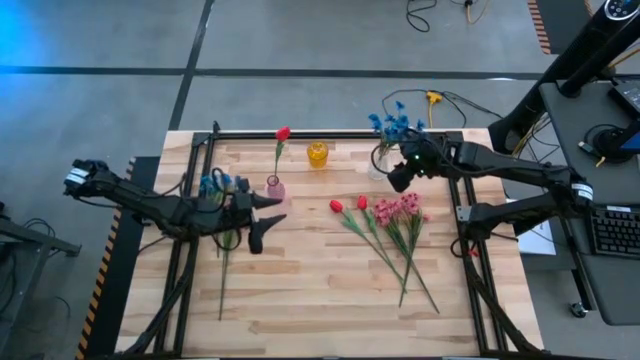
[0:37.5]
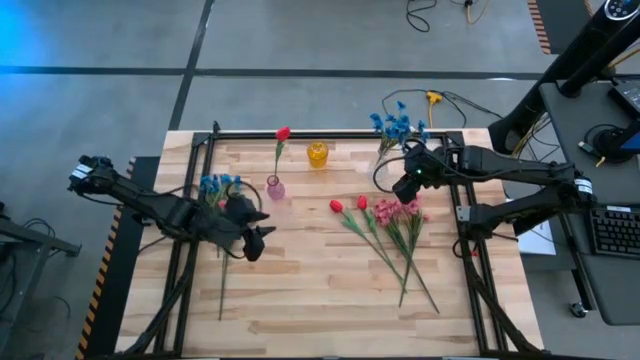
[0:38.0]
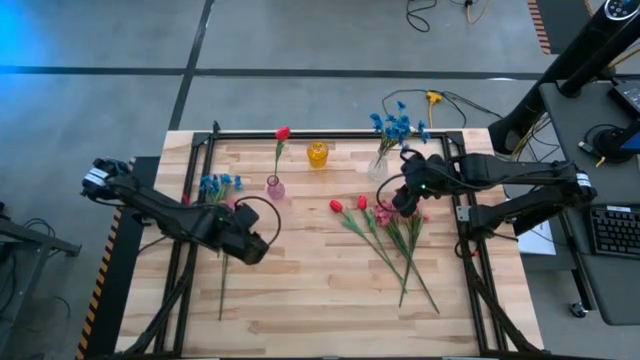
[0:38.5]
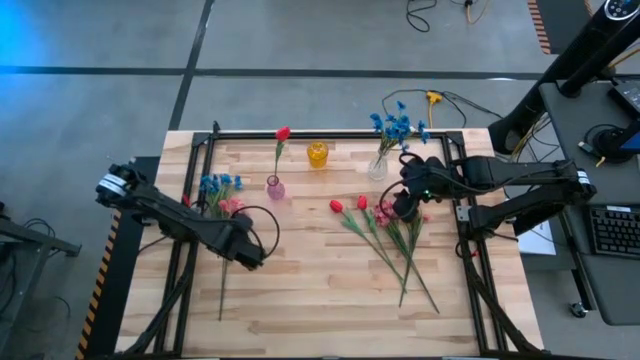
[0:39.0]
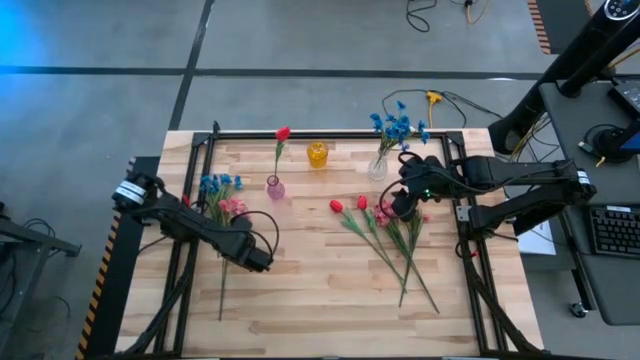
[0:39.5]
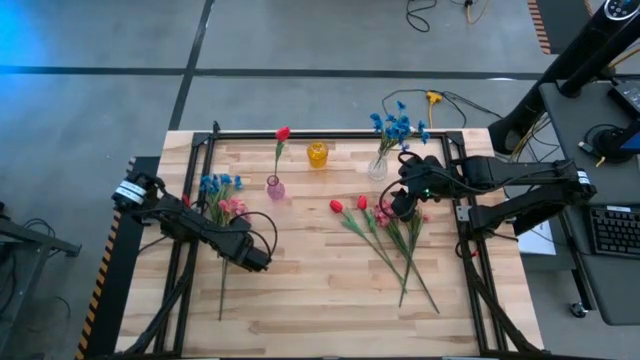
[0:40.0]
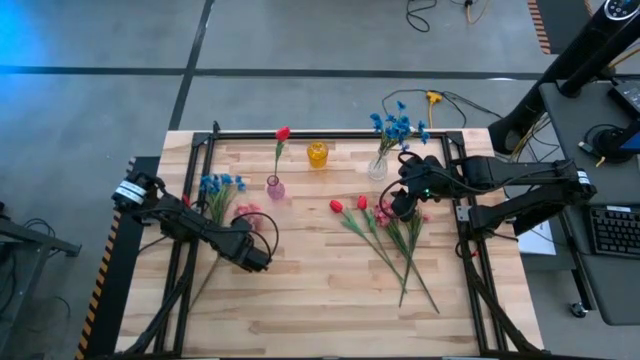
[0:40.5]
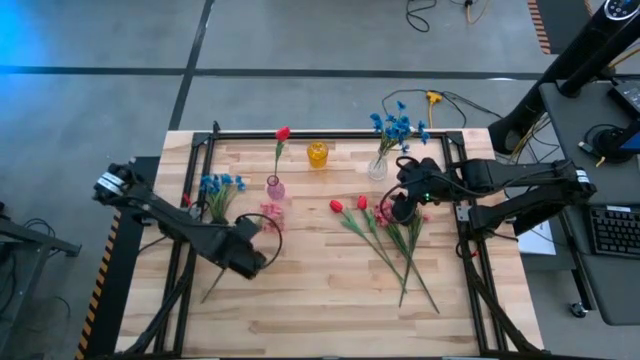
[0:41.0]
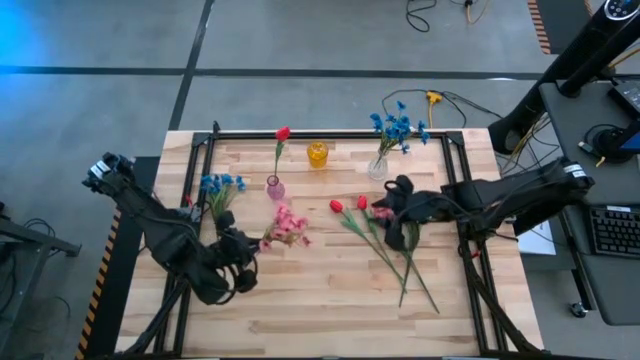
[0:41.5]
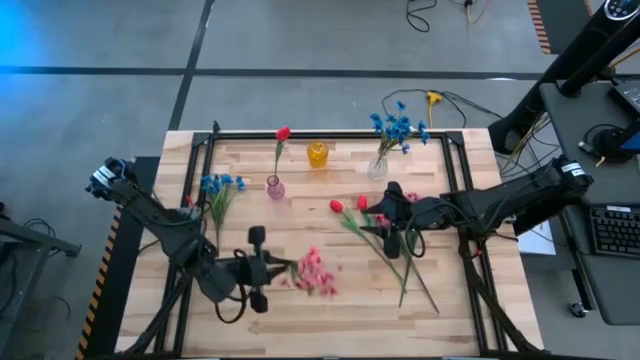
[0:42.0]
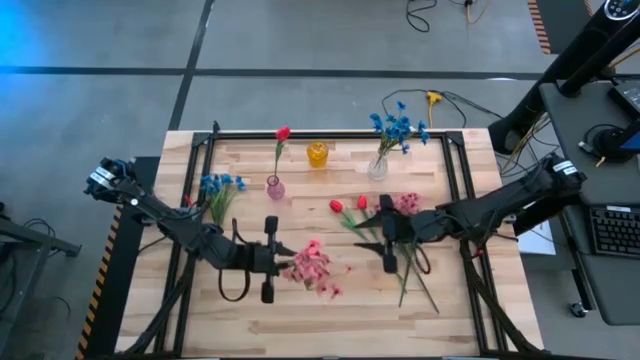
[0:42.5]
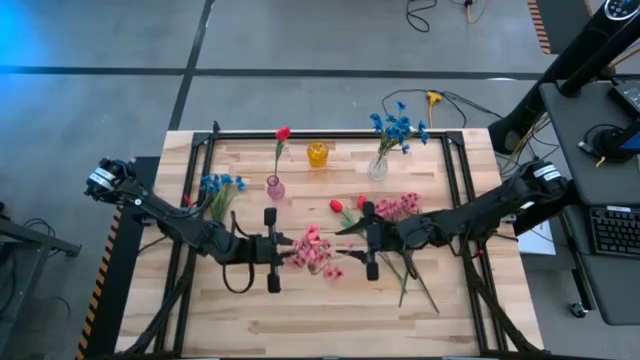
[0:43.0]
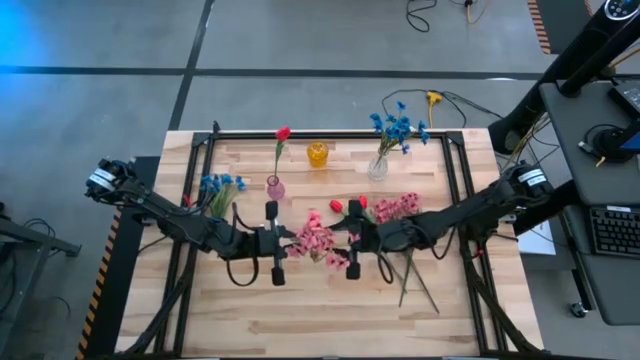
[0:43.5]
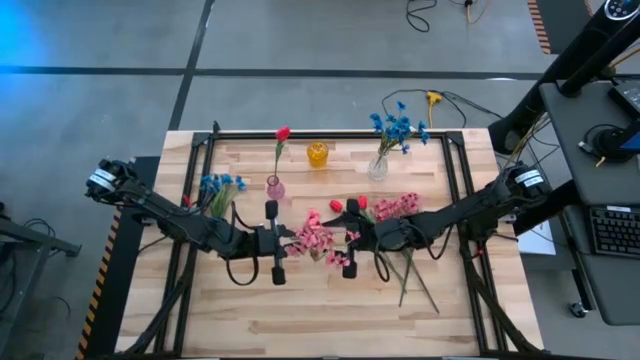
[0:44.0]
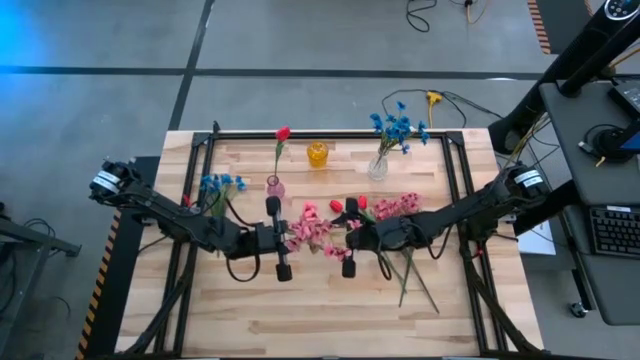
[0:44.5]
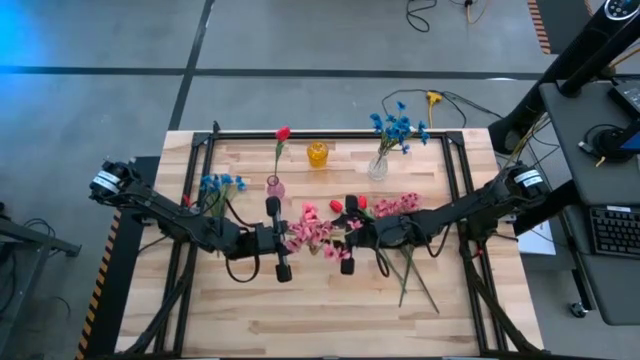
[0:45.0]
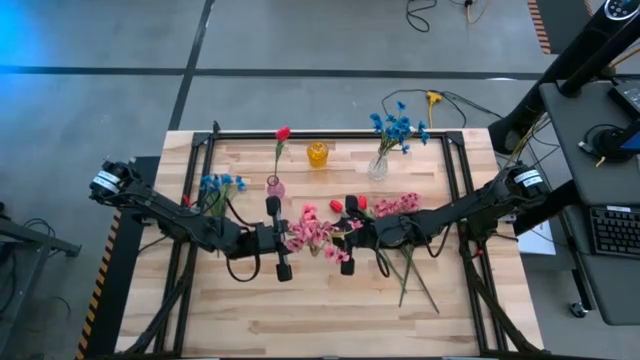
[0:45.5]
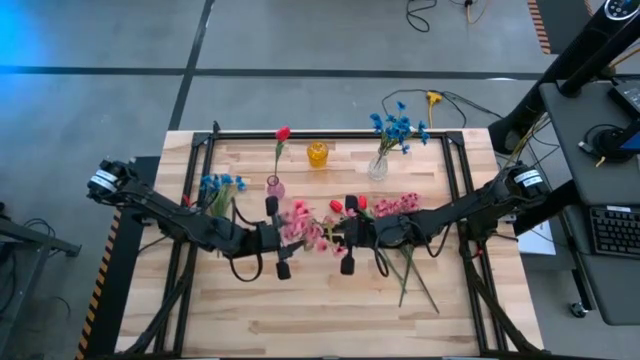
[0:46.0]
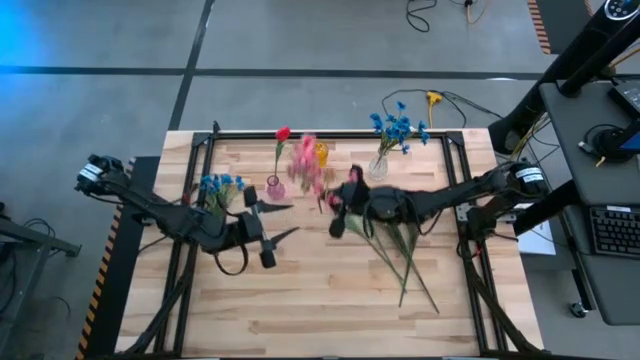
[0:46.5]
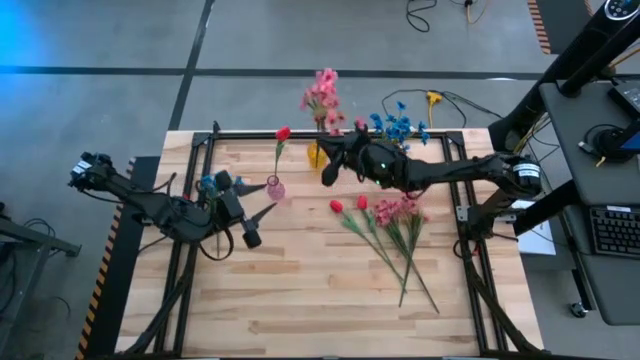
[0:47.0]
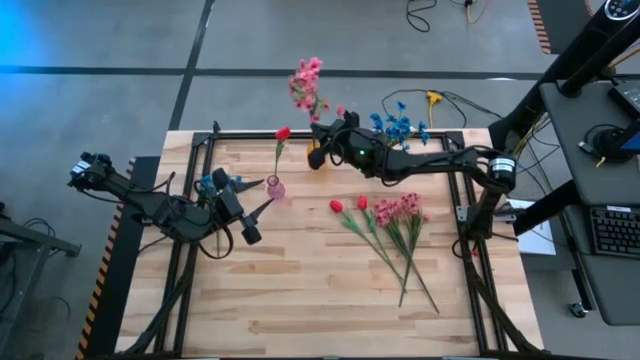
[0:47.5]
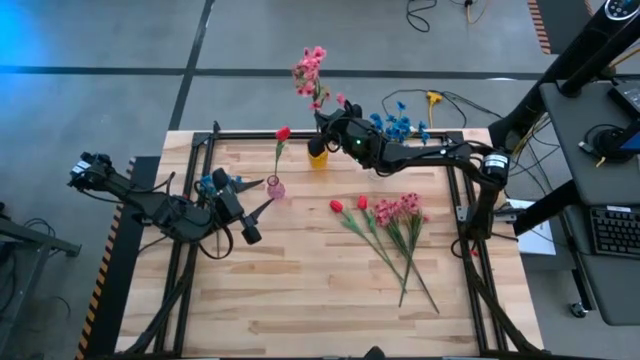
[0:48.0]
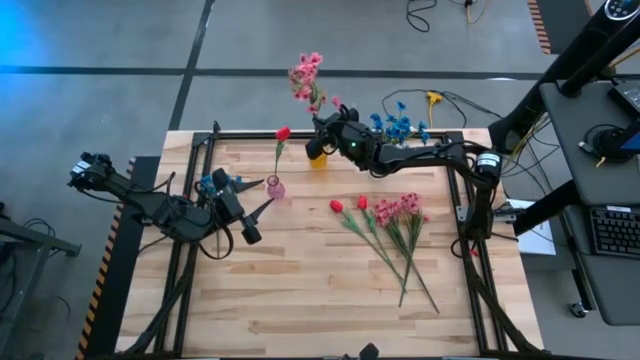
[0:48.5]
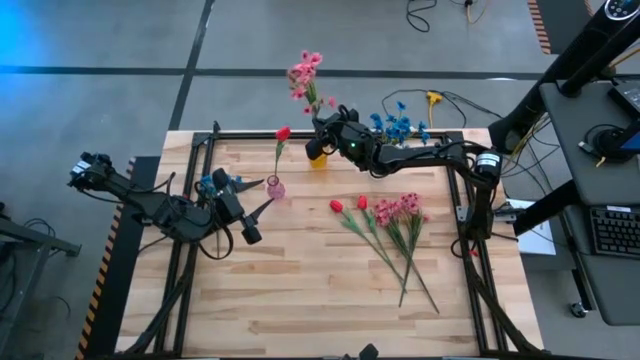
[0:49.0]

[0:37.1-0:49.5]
Task: Sort flowers into vase by color
Put the left pink flowers into the yellow vase

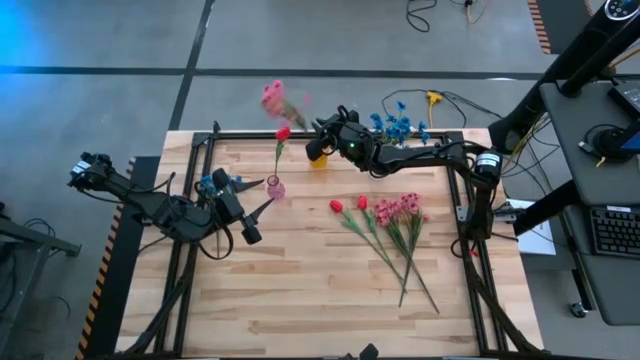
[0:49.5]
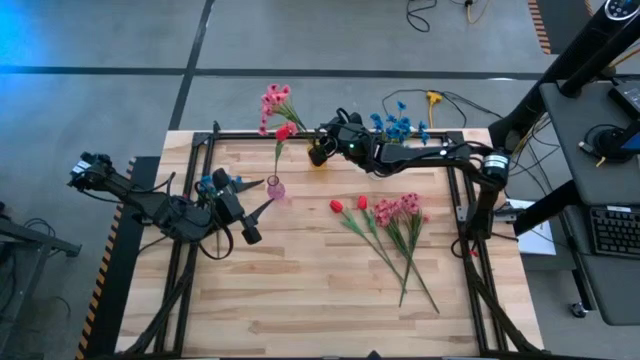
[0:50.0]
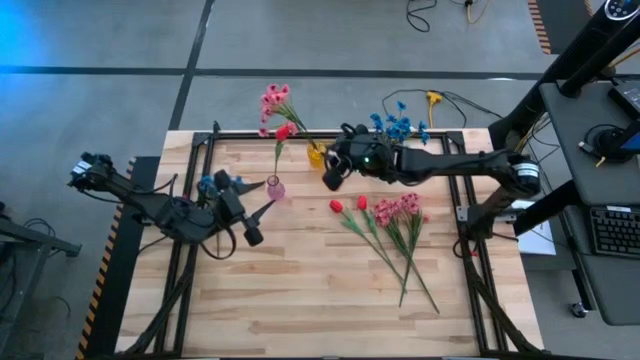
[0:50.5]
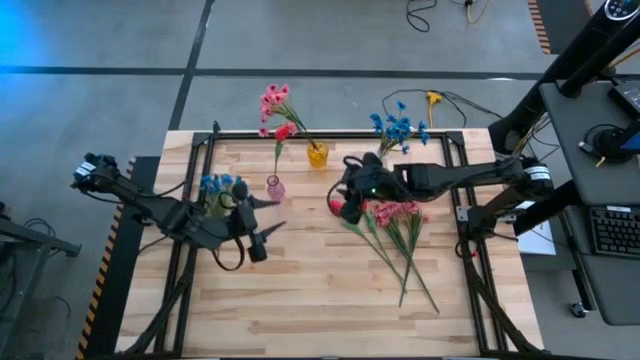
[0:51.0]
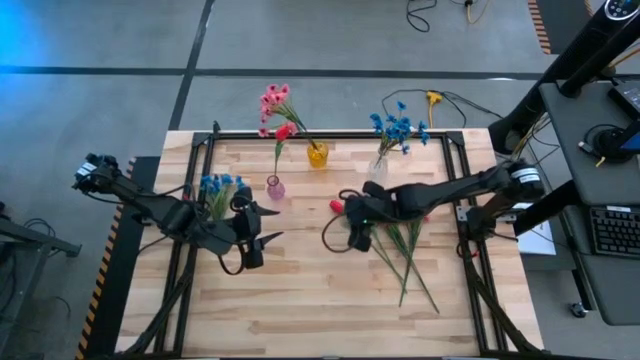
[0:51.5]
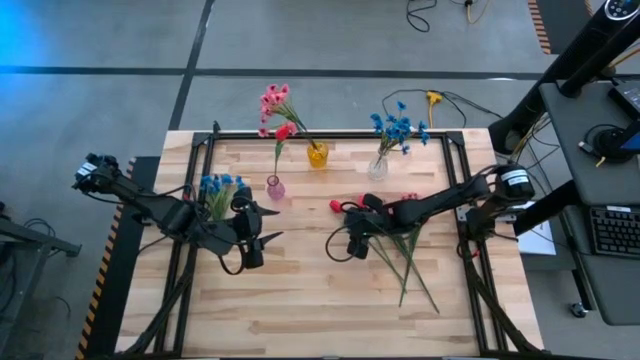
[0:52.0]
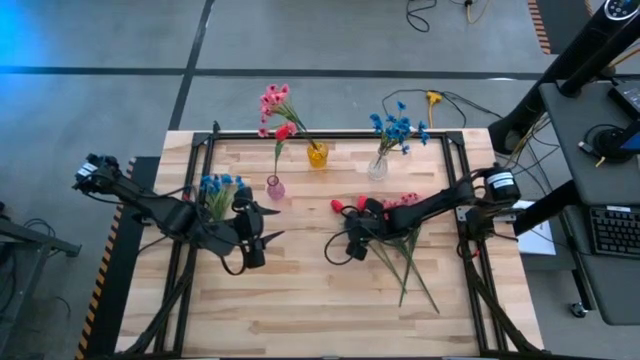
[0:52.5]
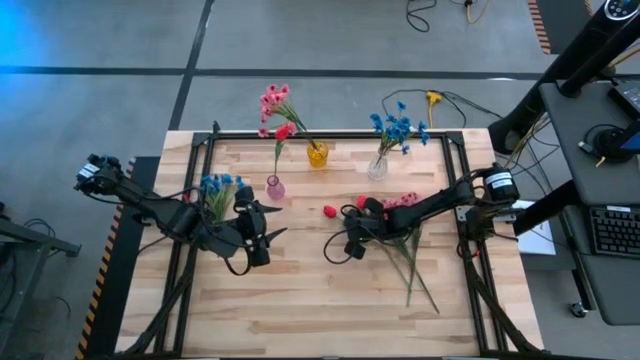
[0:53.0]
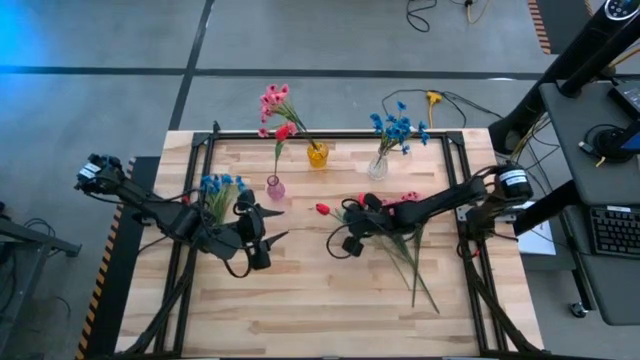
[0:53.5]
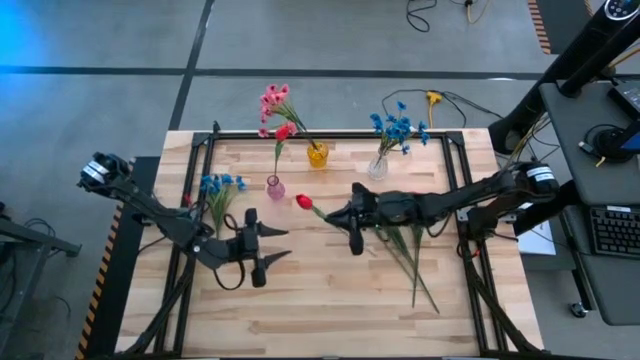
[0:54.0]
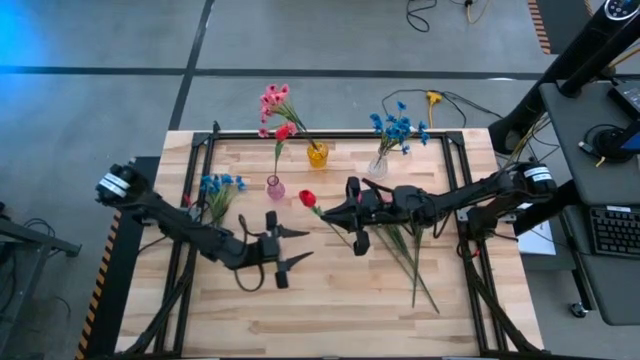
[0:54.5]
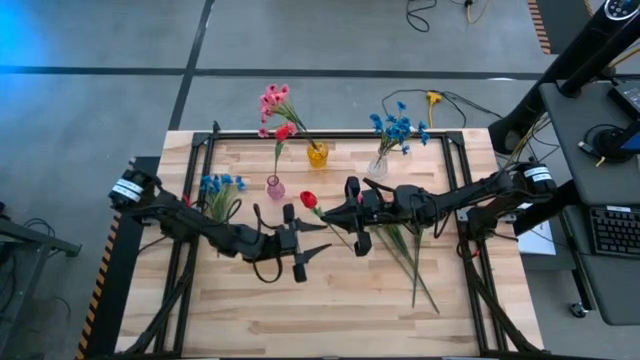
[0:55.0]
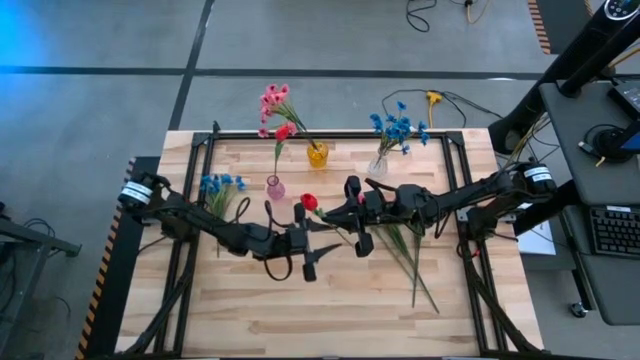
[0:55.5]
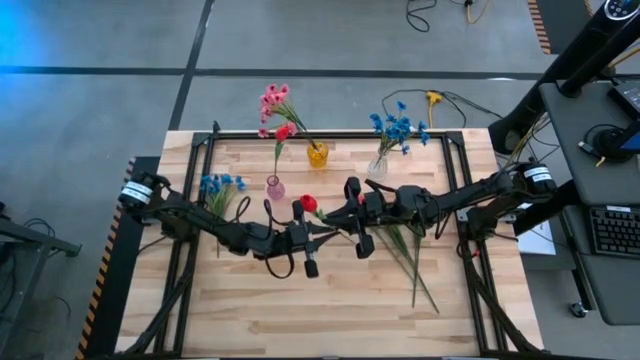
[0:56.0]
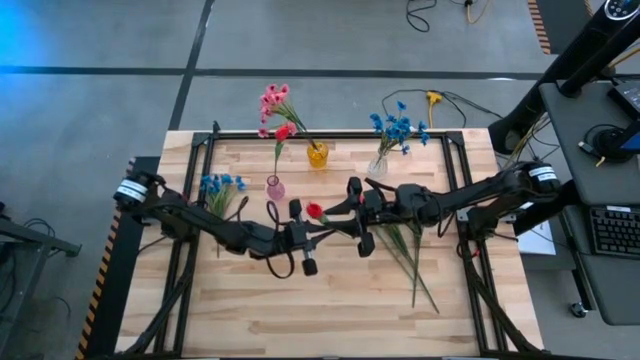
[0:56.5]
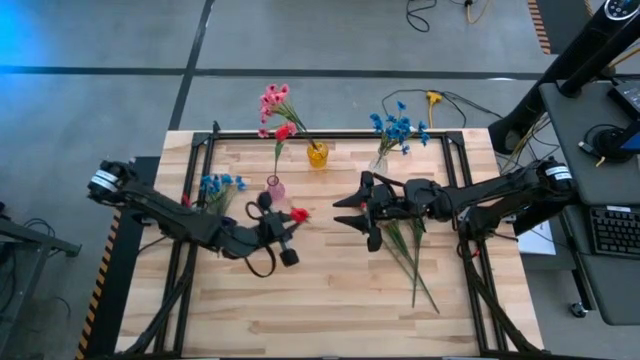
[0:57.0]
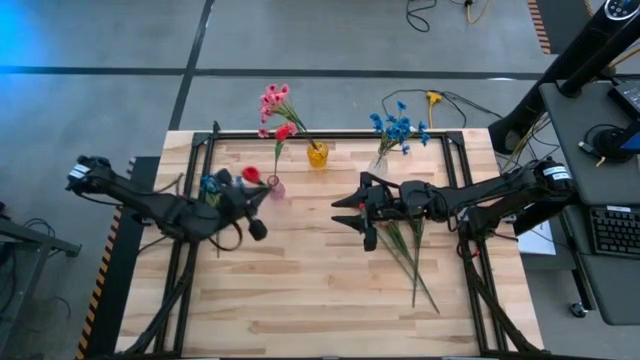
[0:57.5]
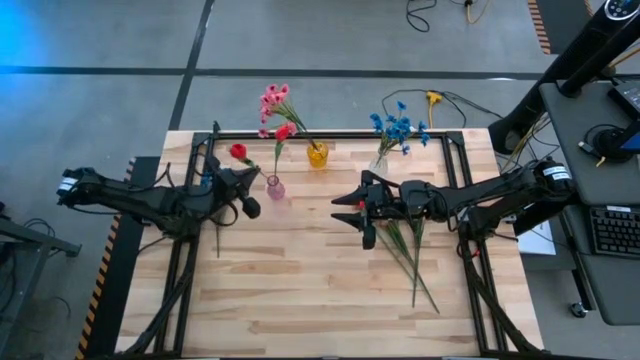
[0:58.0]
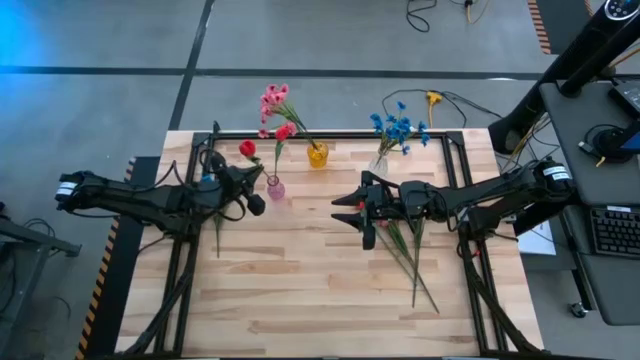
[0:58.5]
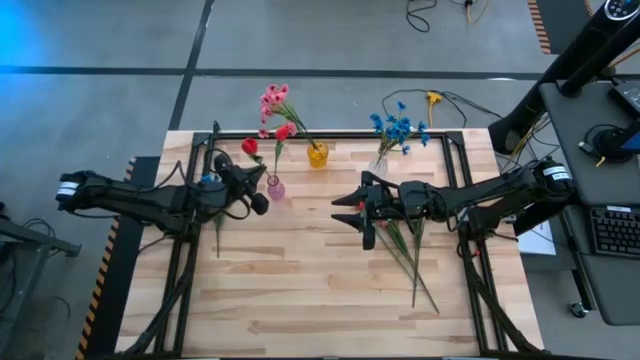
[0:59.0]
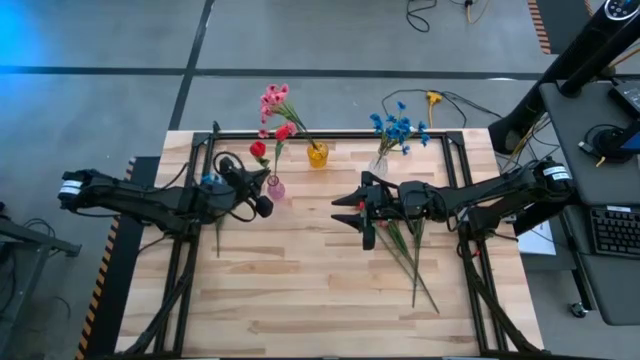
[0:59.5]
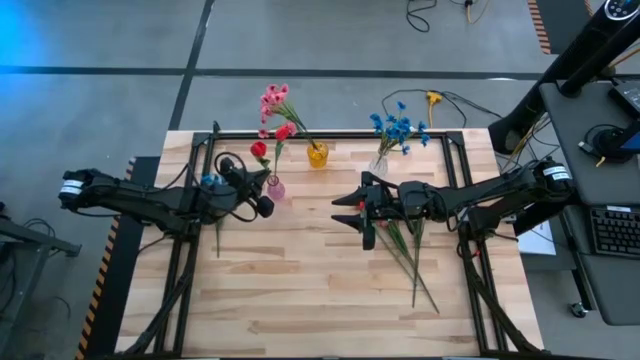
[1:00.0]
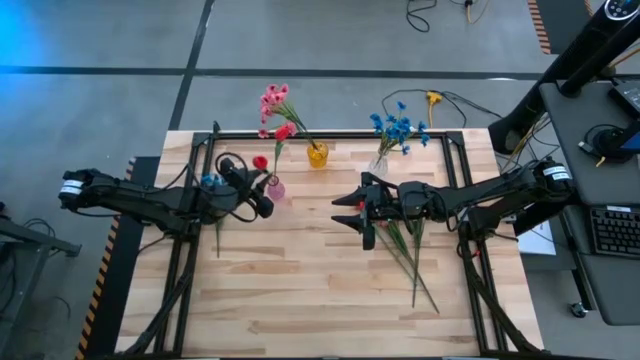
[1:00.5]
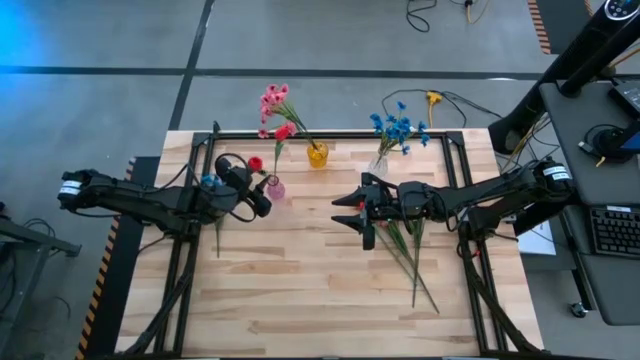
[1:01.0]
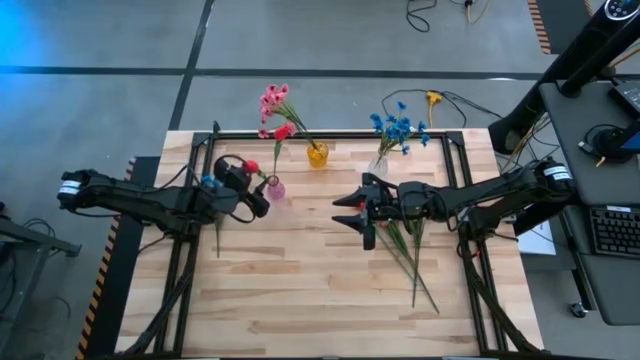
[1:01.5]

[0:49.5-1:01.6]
Put the left red flower into the violet vase
